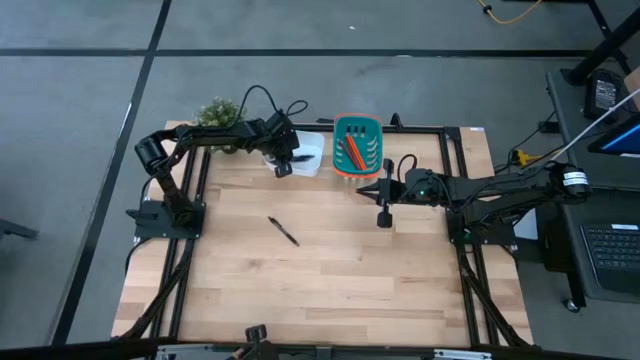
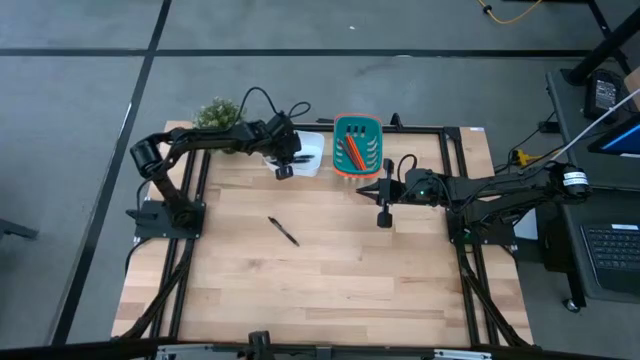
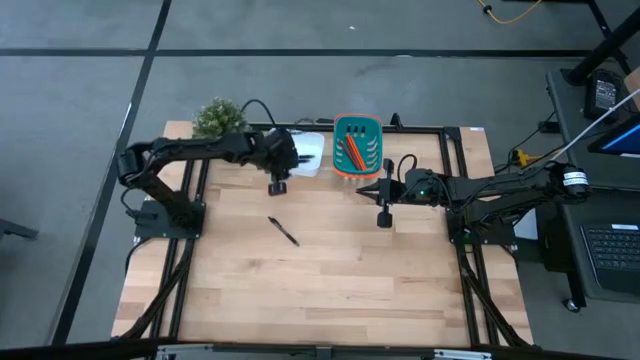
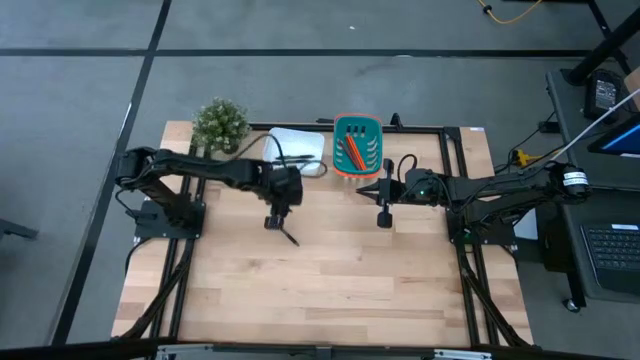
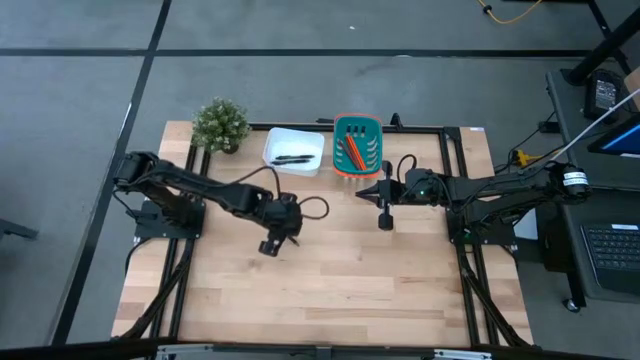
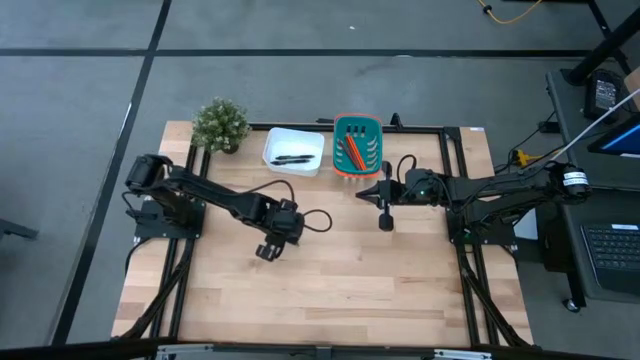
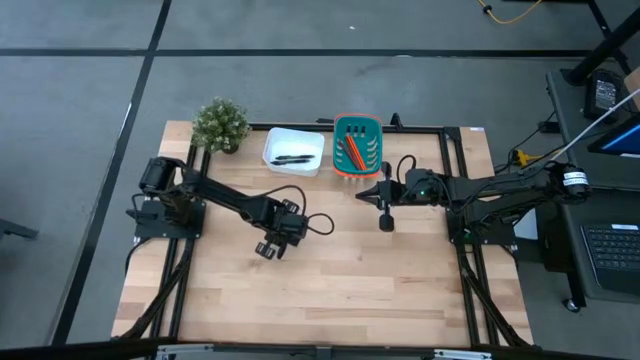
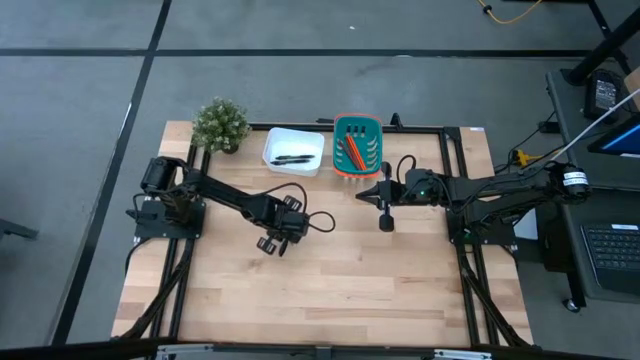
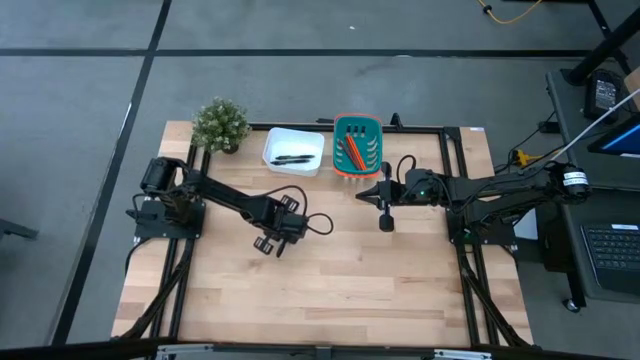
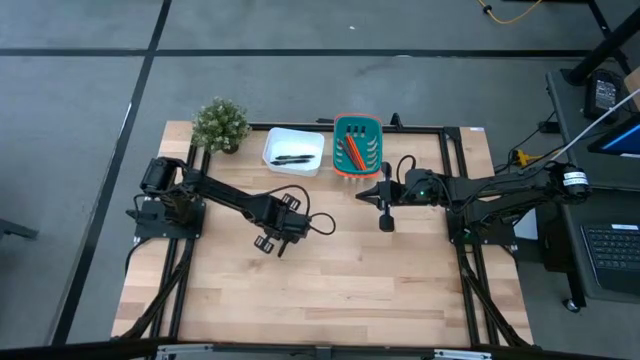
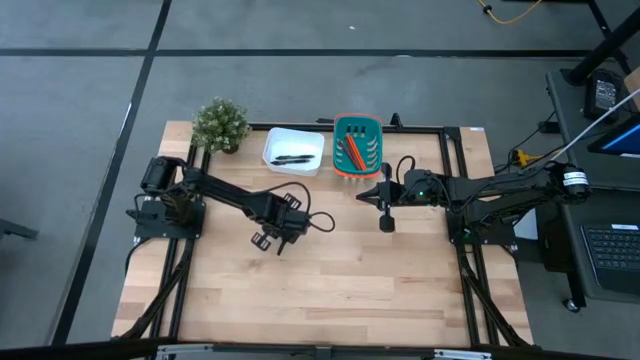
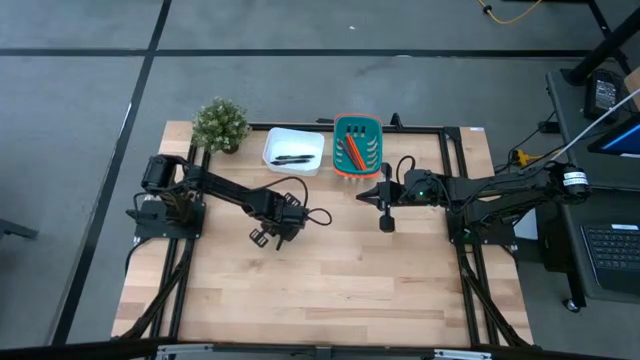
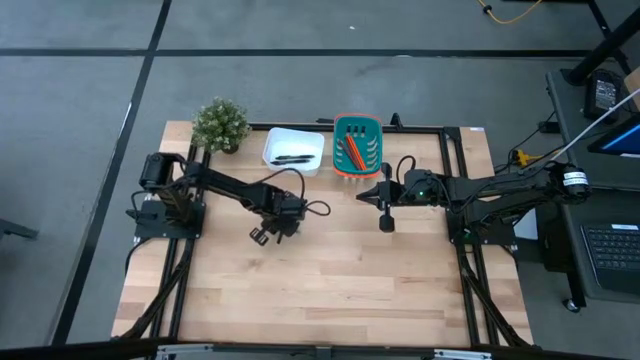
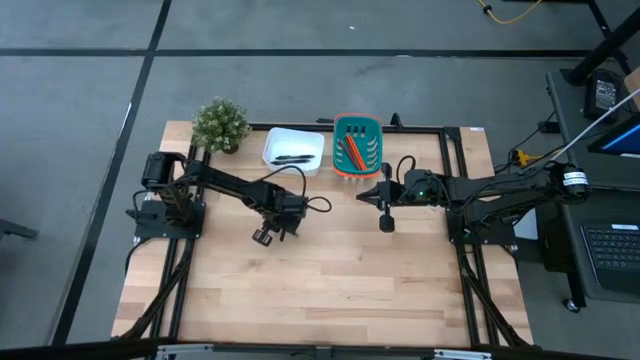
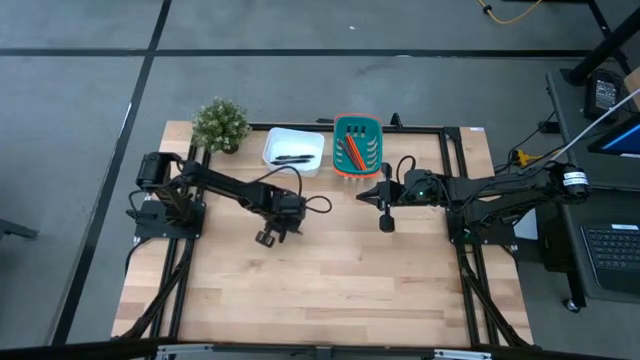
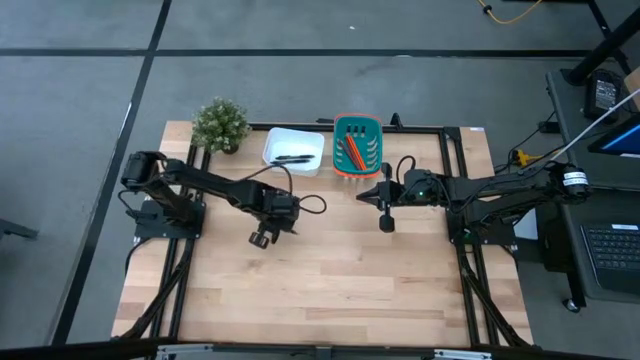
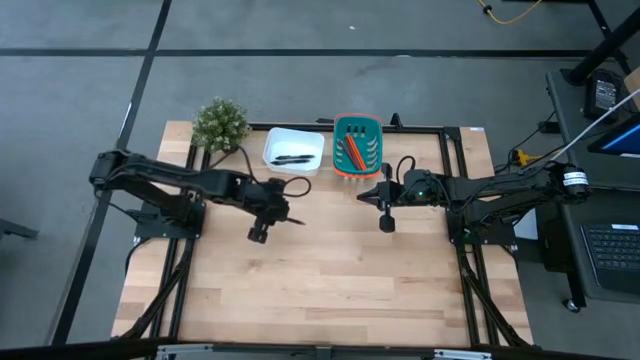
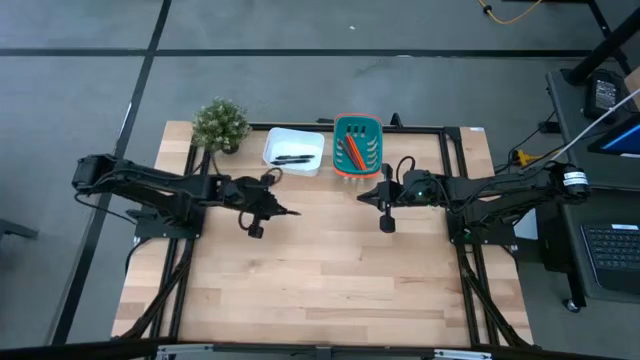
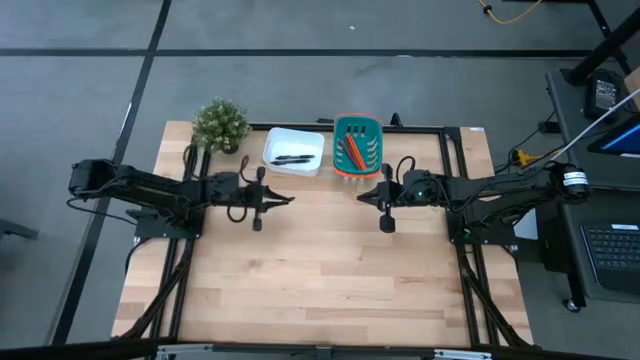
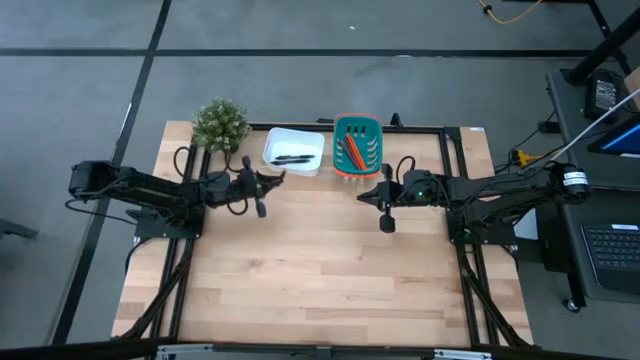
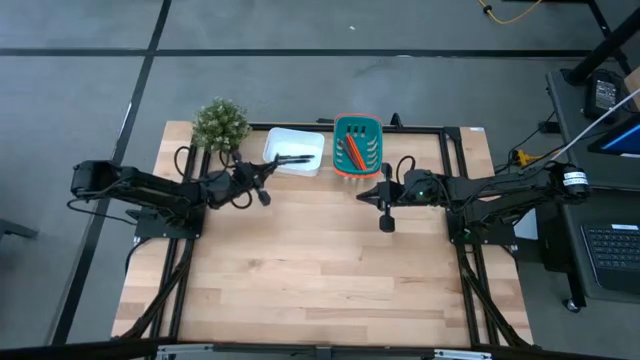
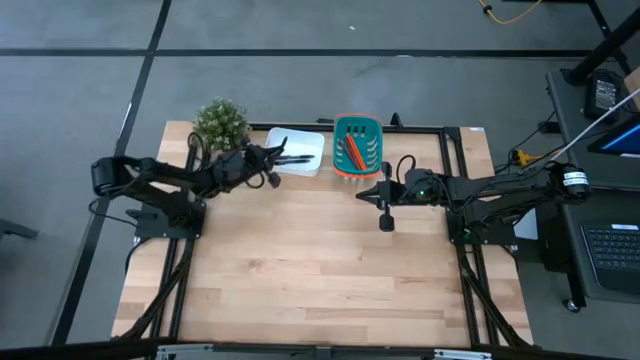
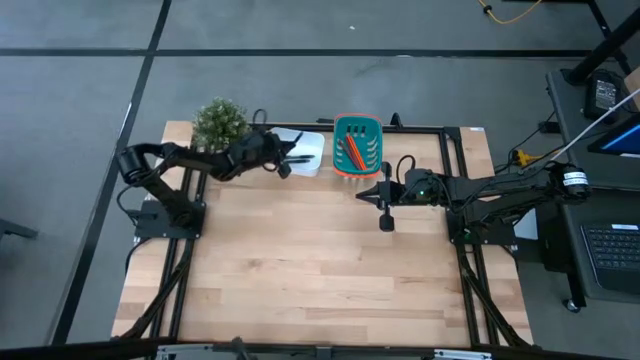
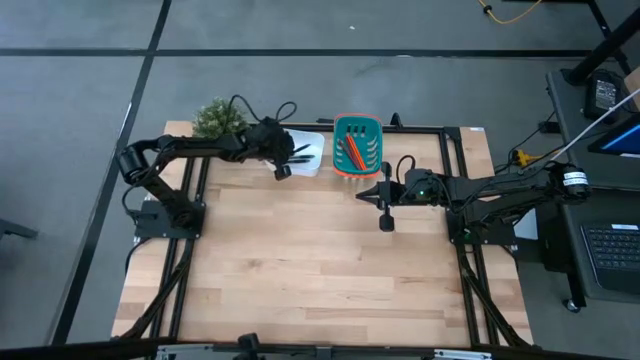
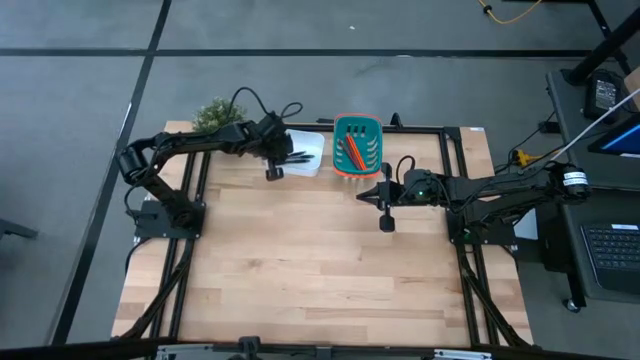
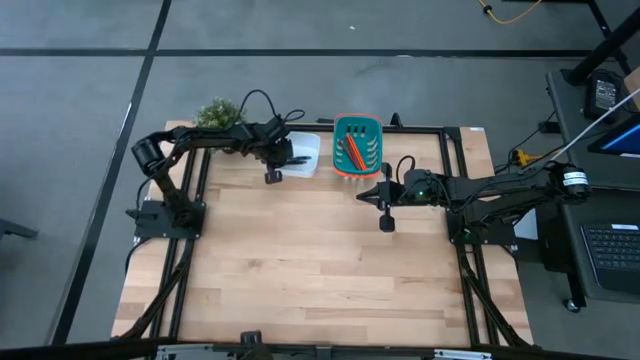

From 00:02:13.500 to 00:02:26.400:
Task: Sort pens & pencils
Put the black pen into the white bin

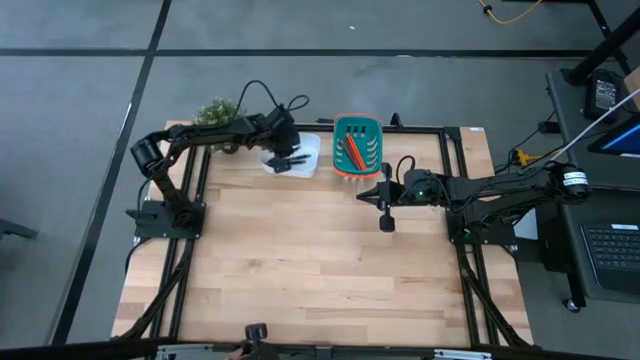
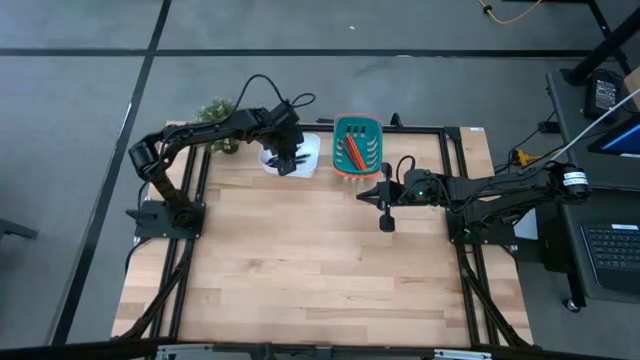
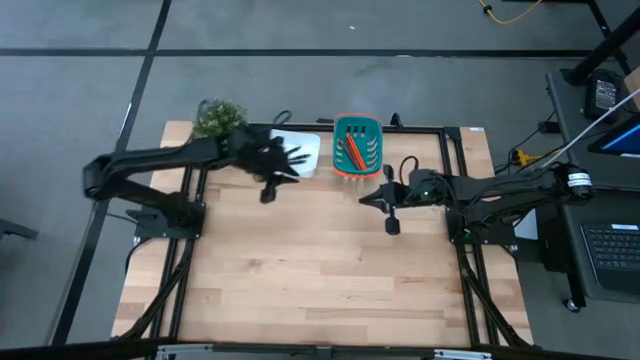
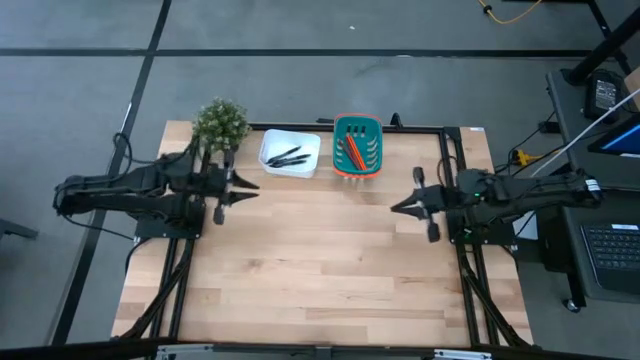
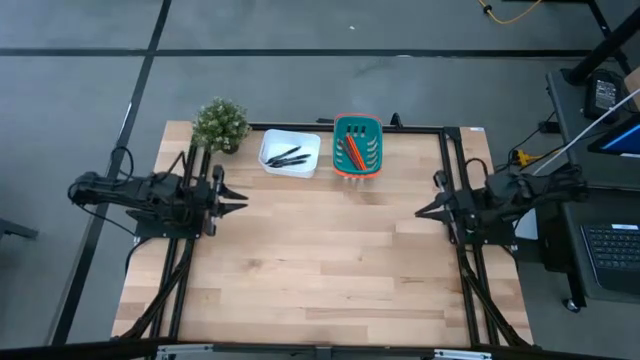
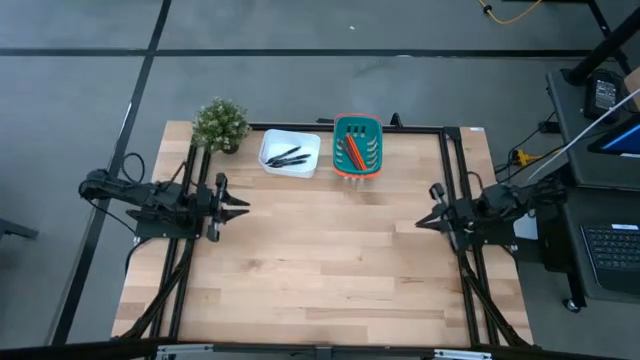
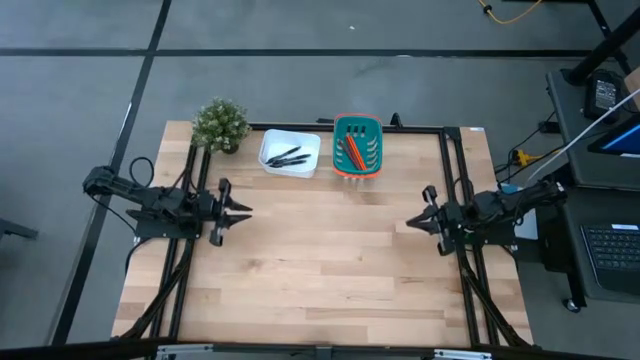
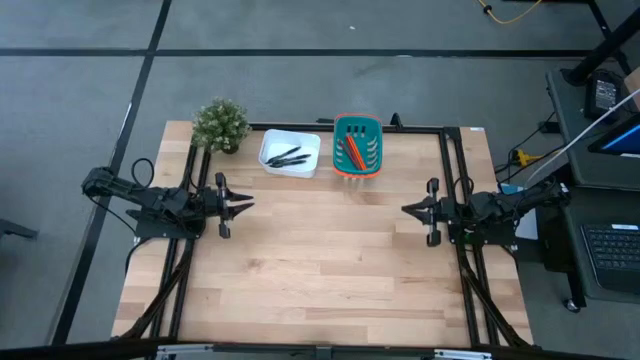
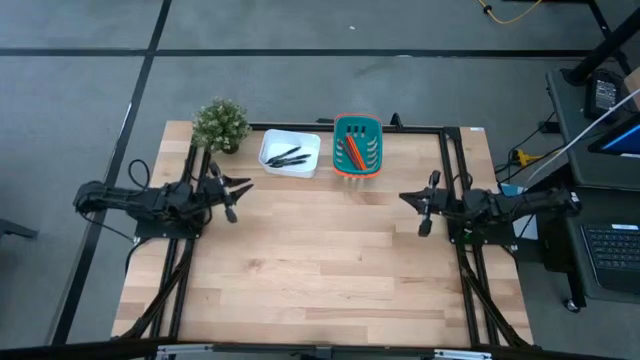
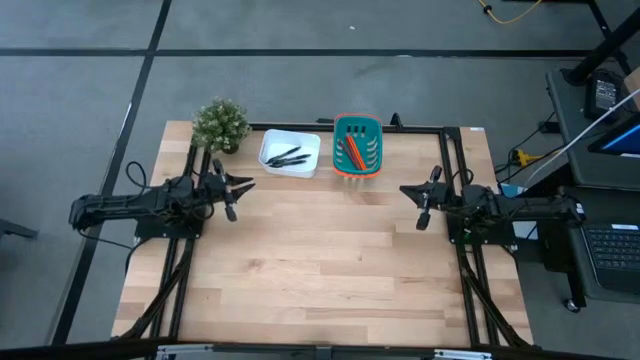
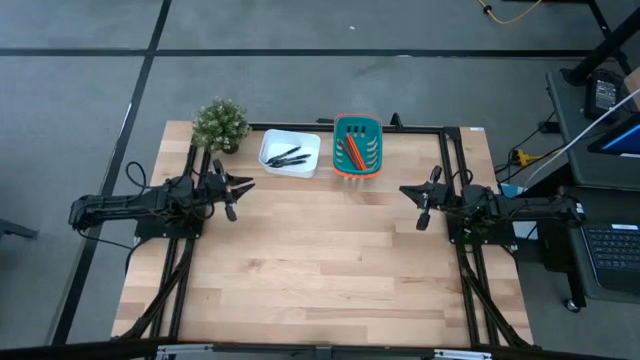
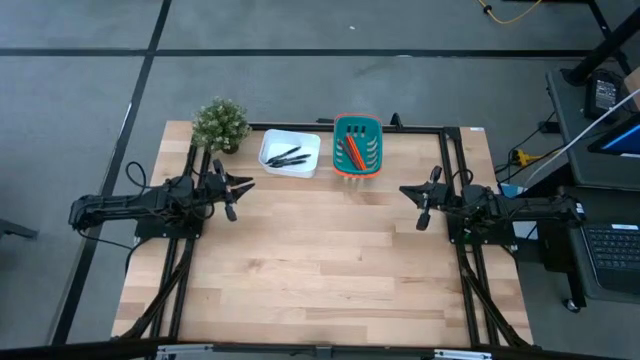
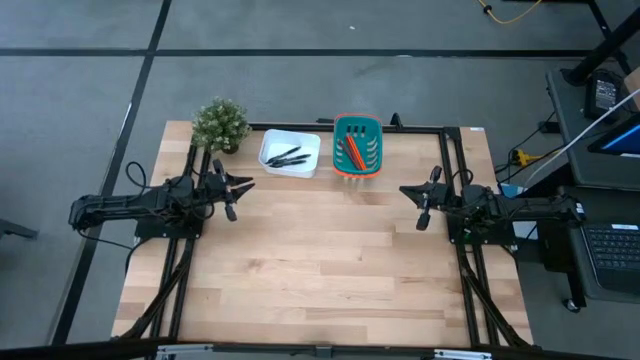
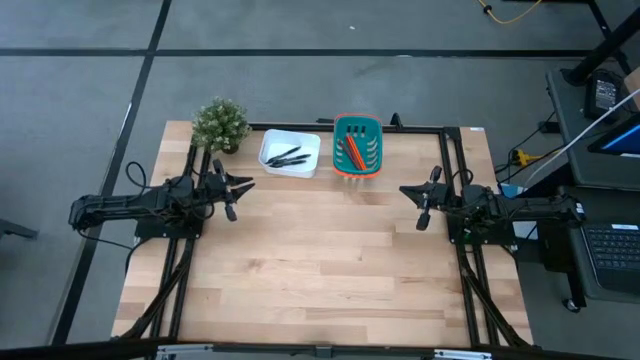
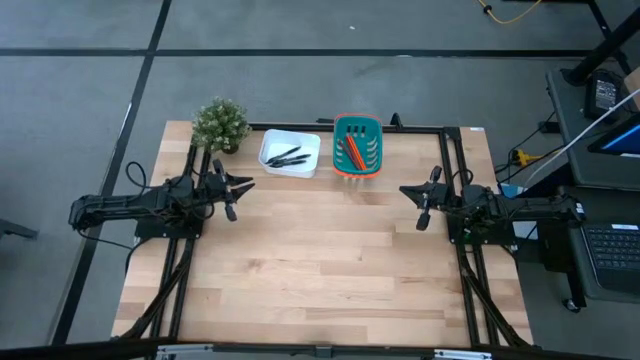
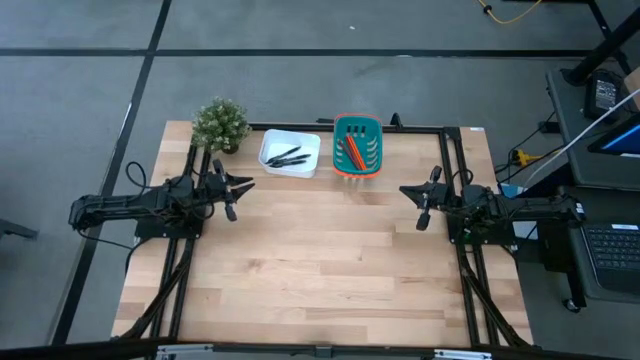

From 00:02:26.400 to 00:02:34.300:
Return to Home Position

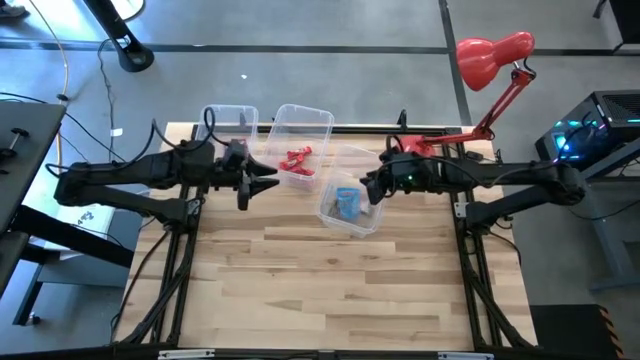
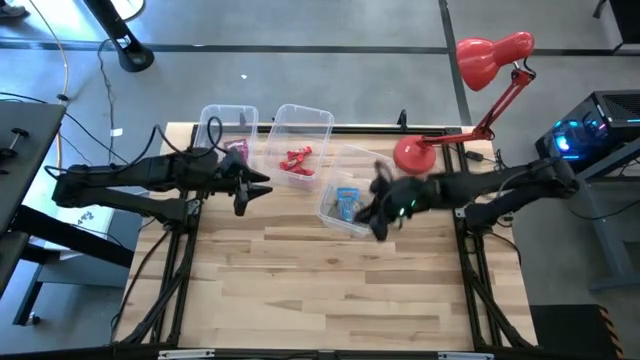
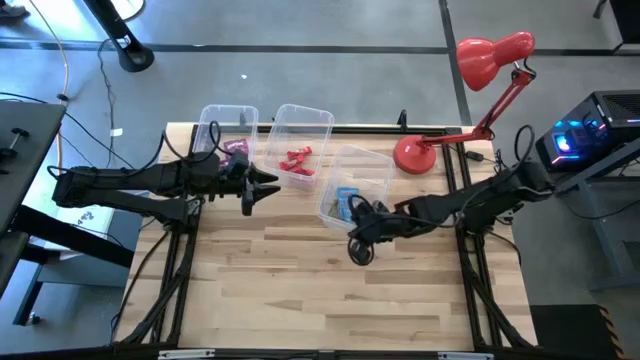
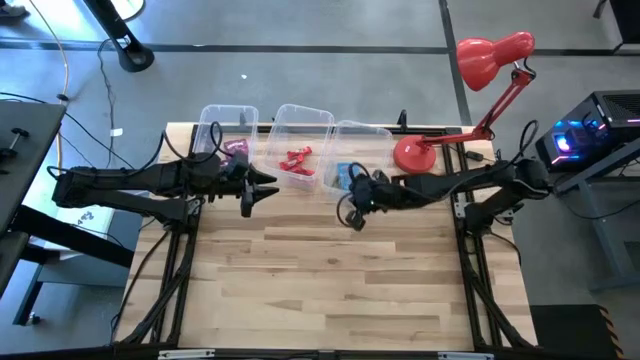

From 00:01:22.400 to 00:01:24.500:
Task: Sort candy
Move the right transparent bin to the top right of the table
